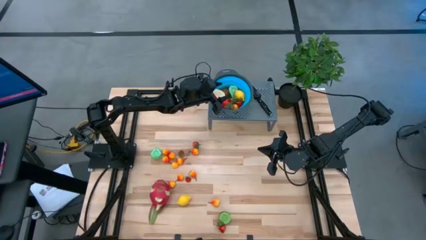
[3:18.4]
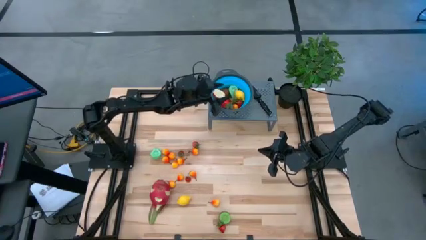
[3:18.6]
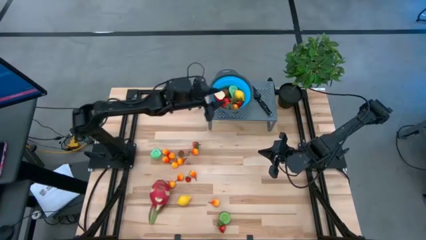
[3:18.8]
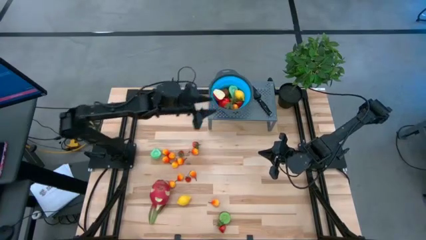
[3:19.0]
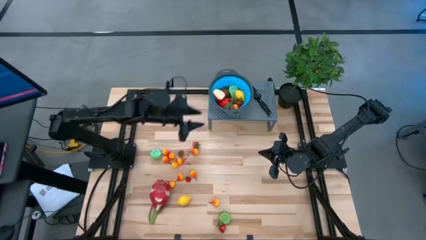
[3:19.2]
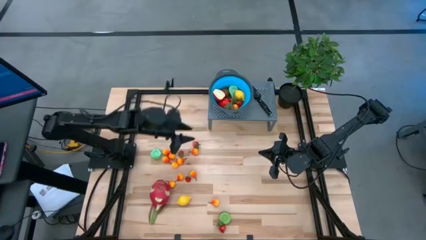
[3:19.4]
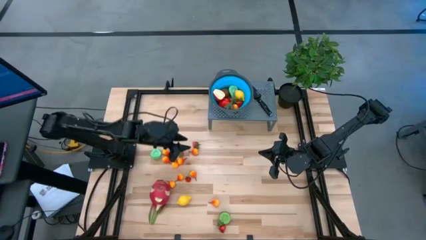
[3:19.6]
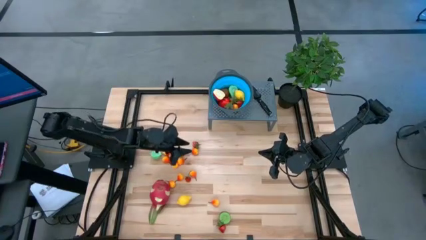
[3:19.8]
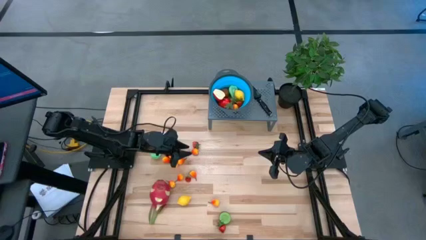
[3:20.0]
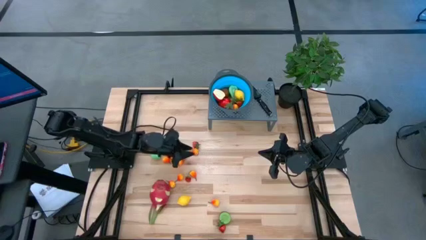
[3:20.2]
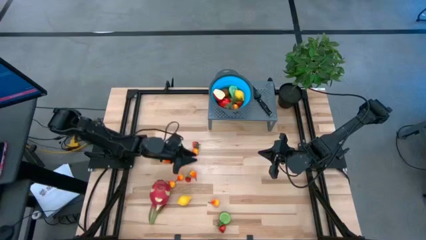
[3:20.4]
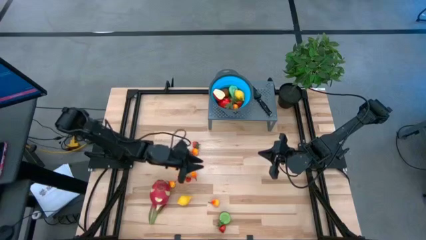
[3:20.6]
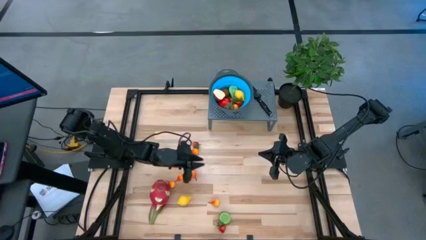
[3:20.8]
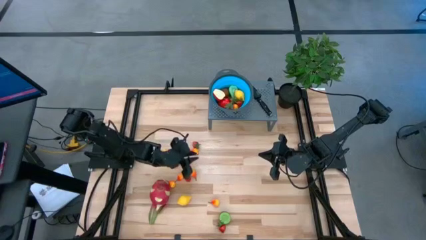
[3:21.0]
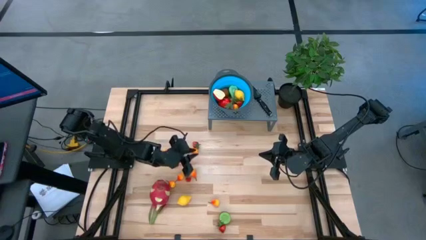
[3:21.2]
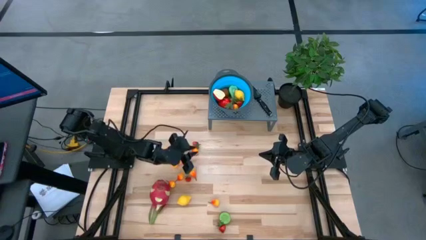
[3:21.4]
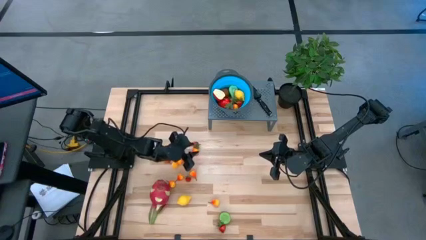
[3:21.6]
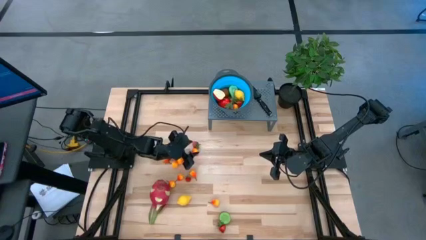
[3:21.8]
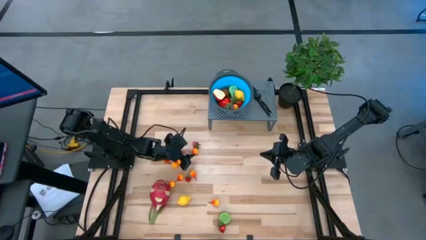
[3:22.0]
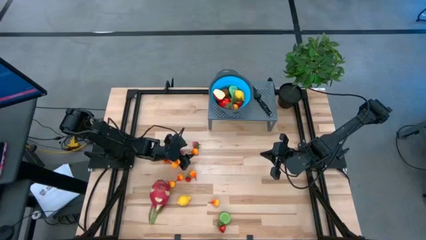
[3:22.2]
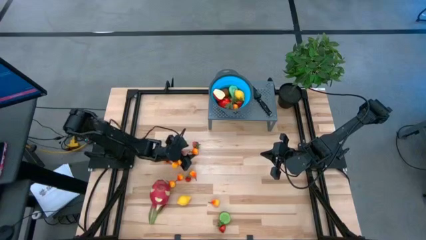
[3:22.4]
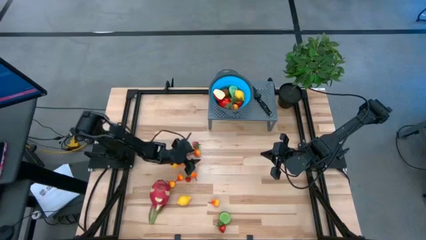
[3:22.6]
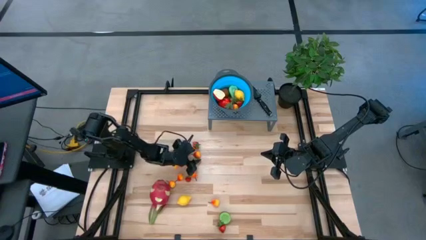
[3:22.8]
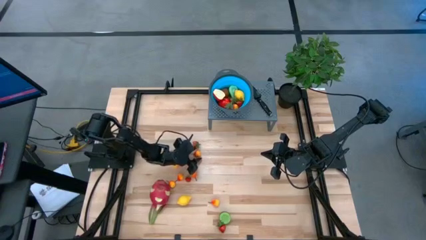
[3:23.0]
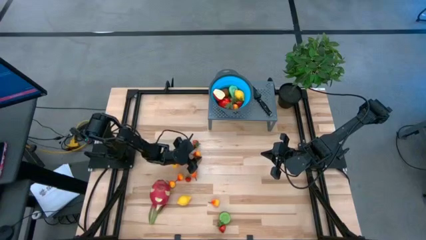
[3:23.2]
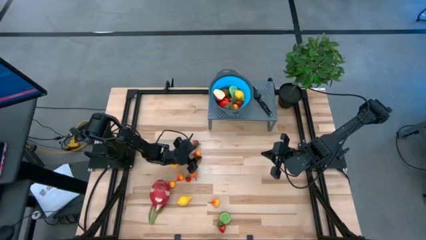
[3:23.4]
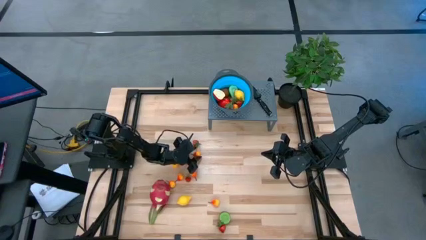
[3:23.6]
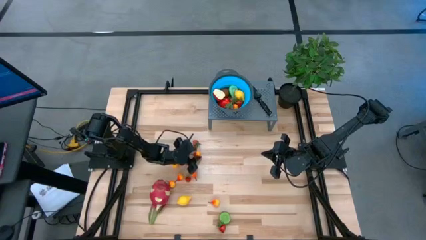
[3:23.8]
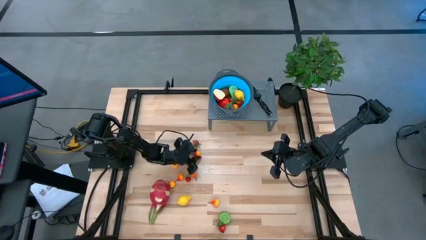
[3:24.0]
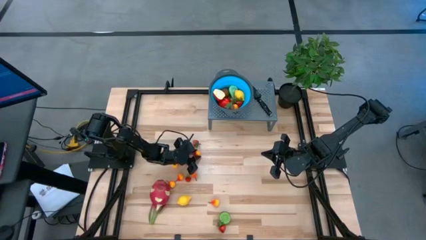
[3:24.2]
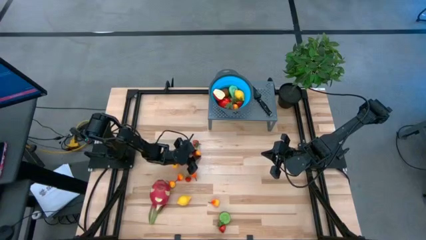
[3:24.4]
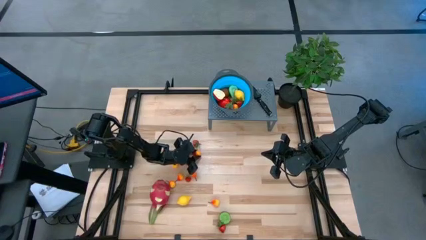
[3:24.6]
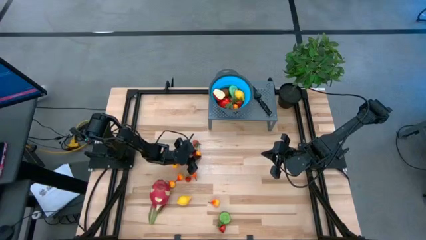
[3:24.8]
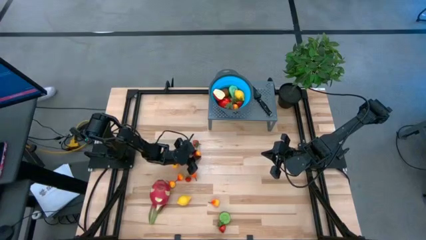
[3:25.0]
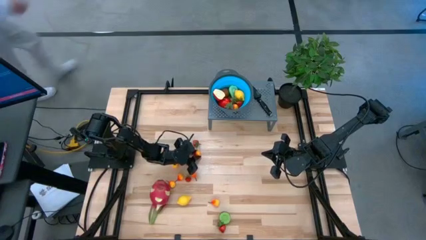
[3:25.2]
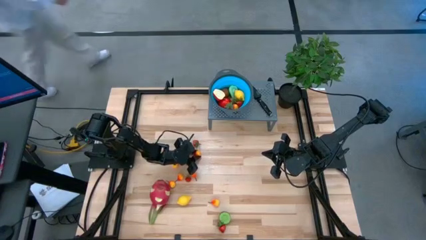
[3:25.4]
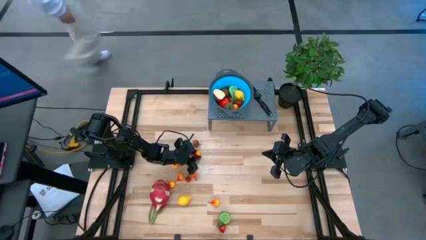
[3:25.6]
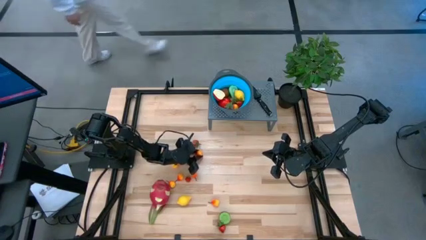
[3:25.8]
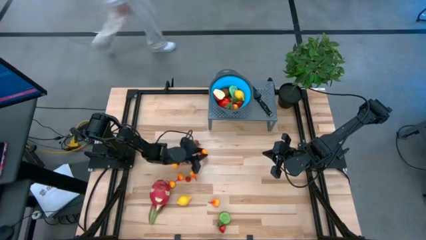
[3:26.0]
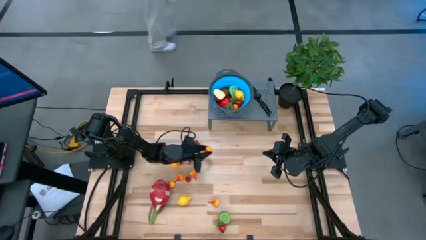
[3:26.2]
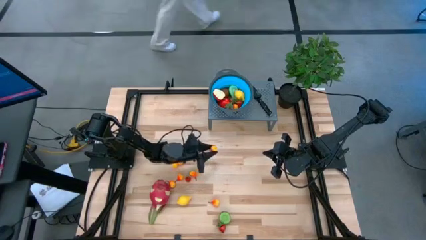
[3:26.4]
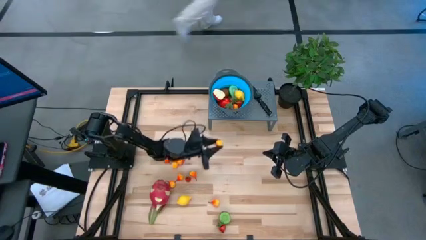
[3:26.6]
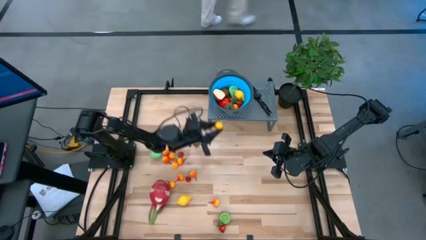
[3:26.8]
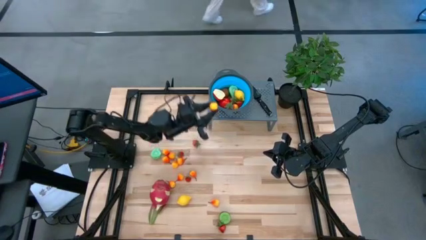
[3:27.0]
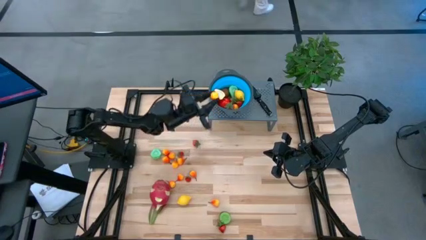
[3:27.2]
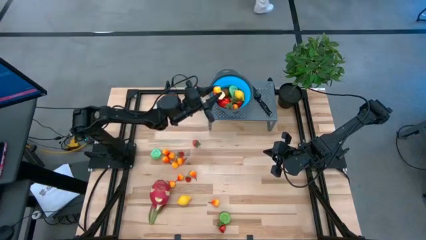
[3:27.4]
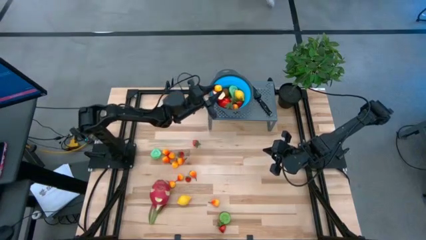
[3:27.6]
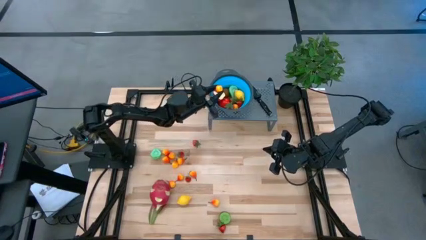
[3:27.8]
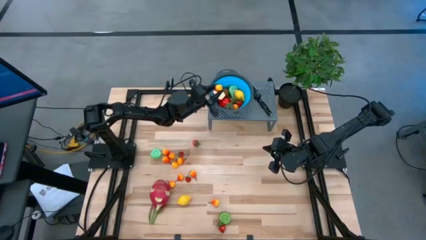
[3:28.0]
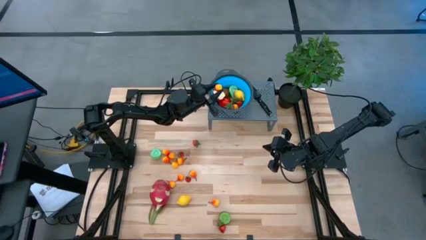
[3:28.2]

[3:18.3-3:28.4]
Task: Pick & Place Fruit
Put the yellow pear into the strainer bowl

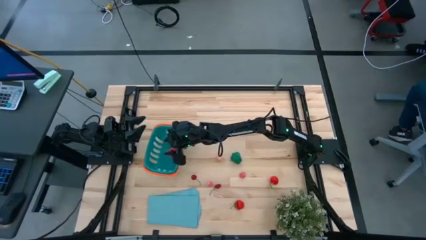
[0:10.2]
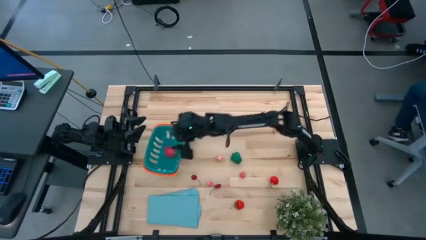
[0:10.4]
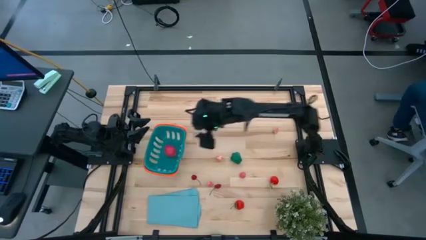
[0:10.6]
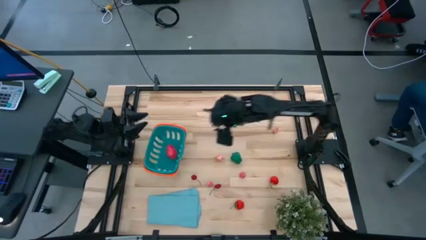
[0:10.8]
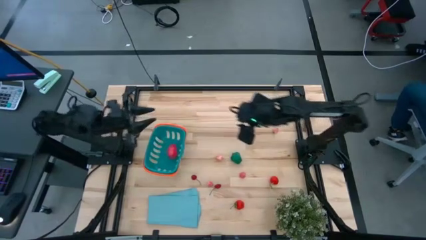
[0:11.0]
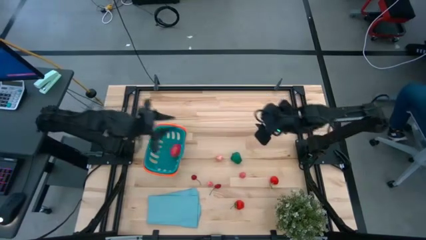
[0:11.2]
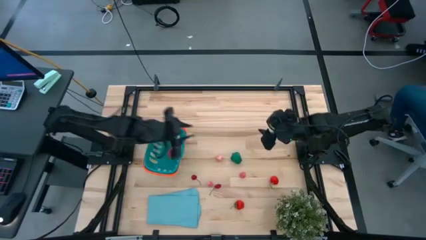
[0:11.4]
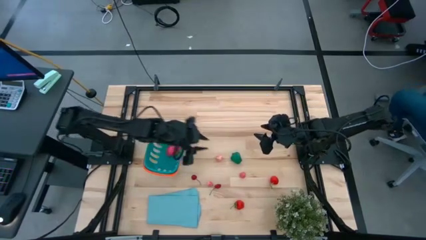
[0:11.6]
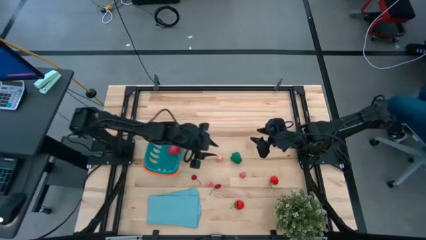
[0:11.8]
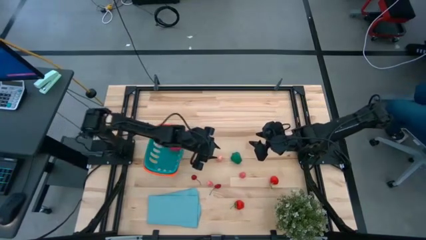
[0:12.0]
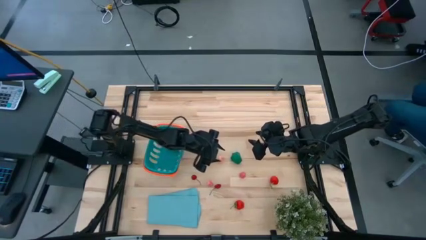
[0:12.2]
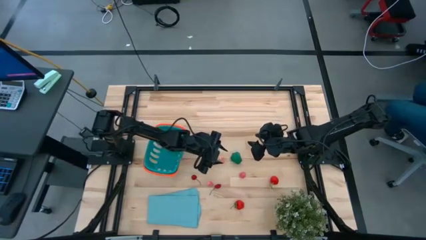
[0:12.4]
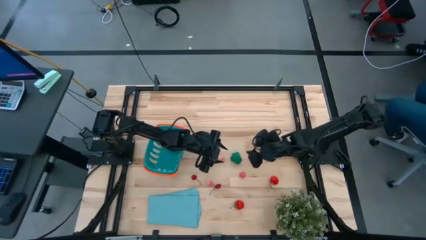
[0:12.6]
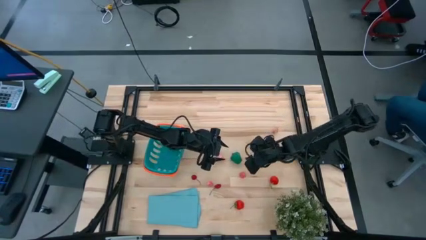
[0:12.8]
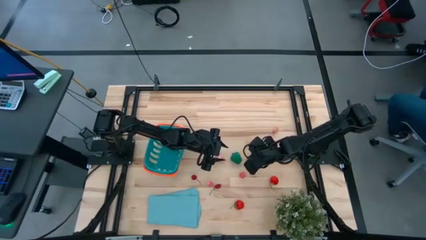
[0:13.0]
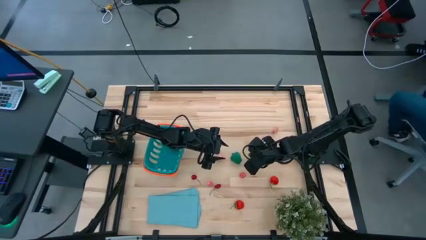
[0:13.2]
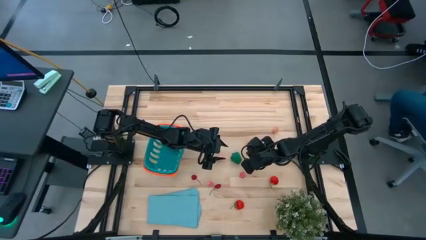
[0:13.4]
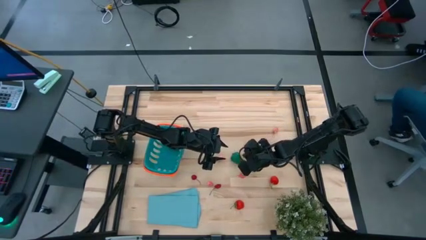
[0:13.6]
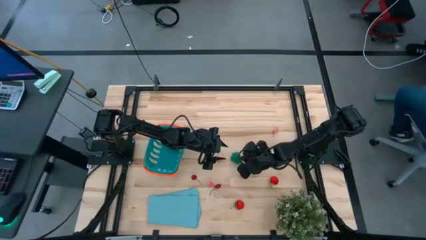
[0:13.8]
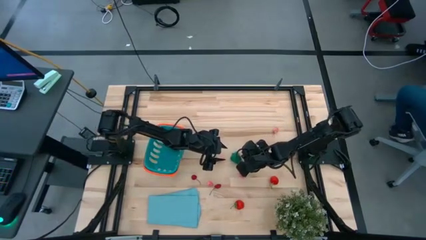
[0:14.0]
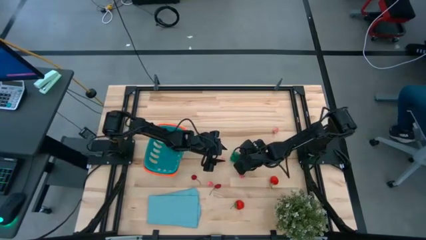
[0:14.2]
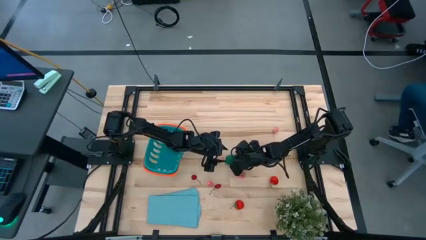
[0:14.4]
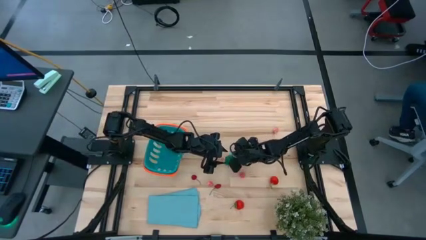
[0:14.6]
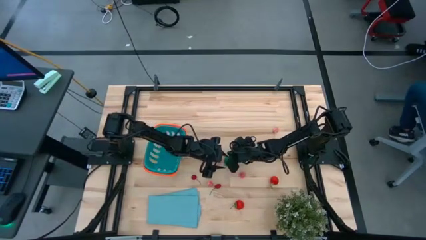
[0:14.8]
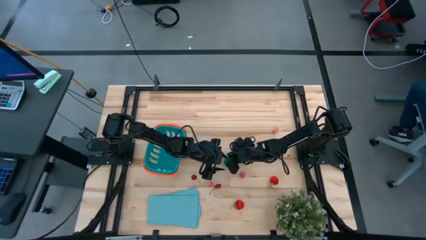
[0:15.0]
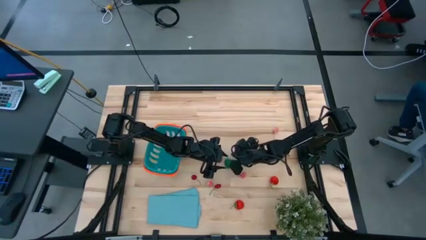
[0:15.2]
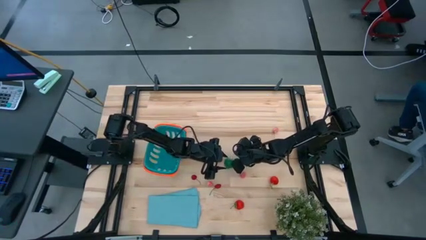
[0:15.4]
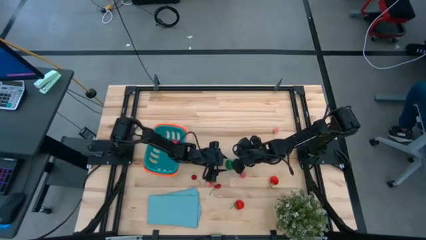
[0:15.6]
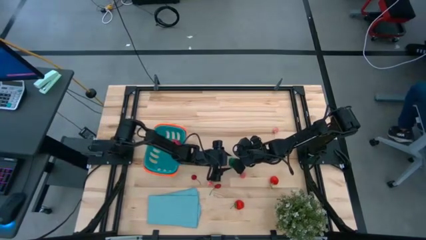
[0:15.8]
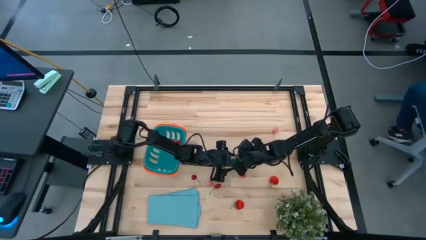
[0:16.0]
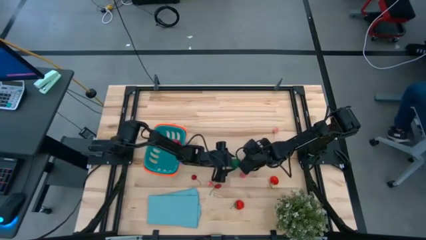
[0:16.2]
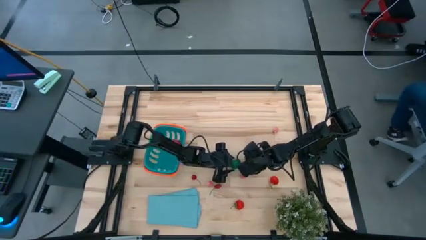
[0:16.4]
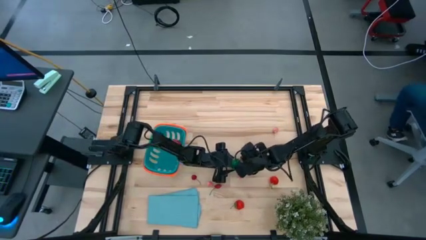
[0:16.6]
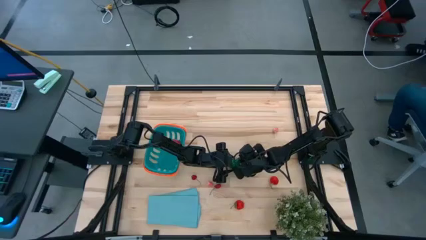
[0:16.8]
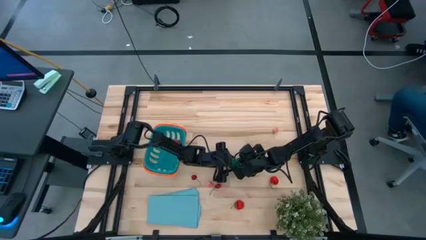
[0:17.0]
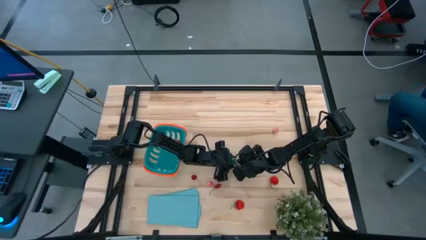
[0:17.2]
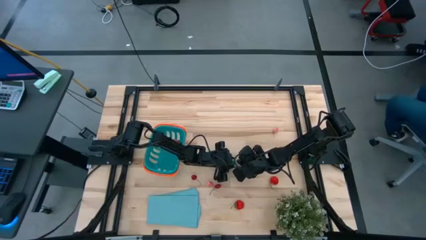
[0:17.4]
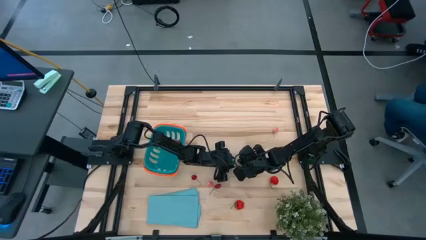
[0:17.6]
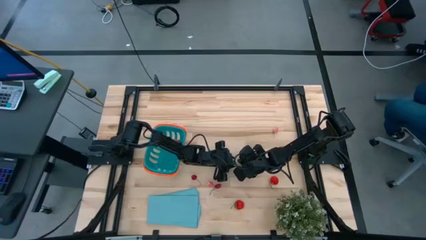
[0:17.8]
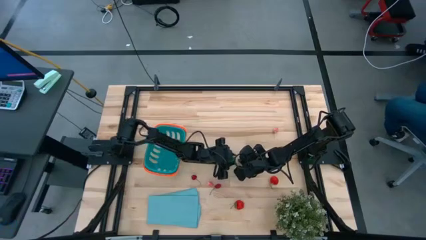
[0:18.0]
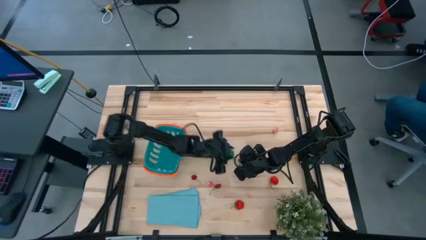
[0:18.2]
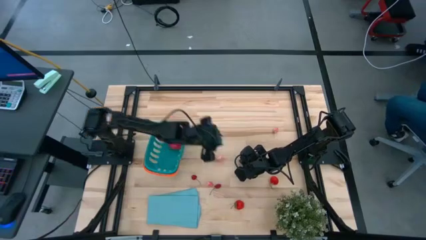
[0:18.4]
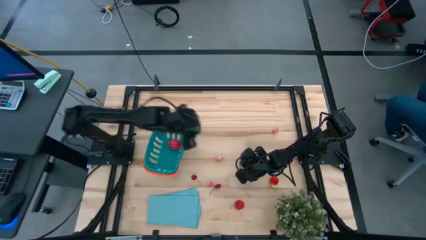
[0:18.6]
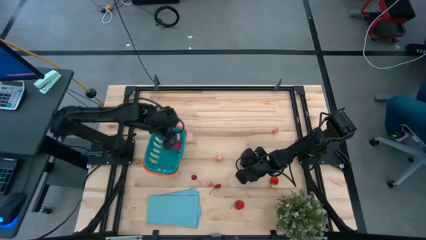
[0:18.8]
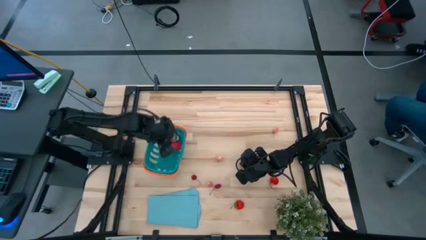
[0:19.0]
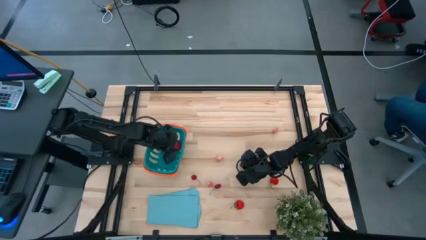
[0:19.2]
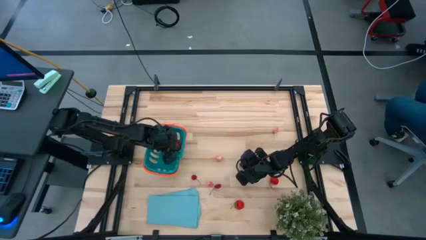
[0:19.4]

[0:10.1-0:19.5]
Task: Pick and placing Produce into tupperware
Put the green bell pepper into the blue basket
